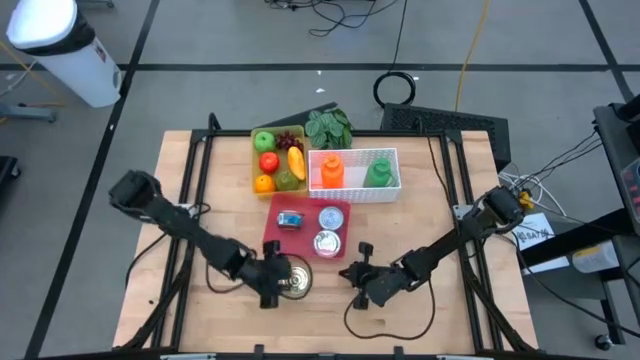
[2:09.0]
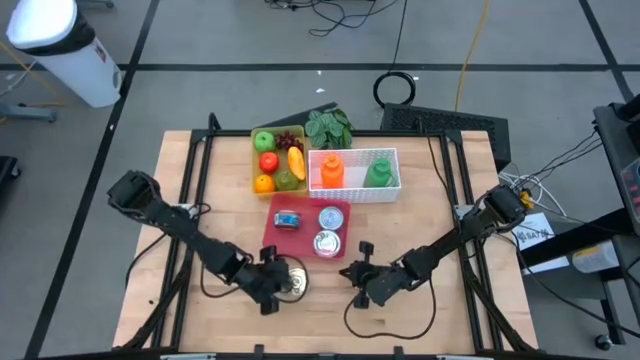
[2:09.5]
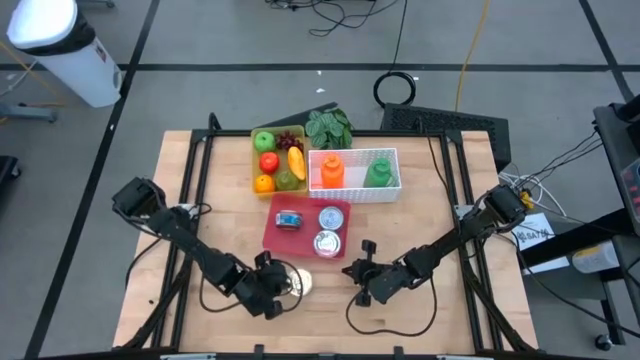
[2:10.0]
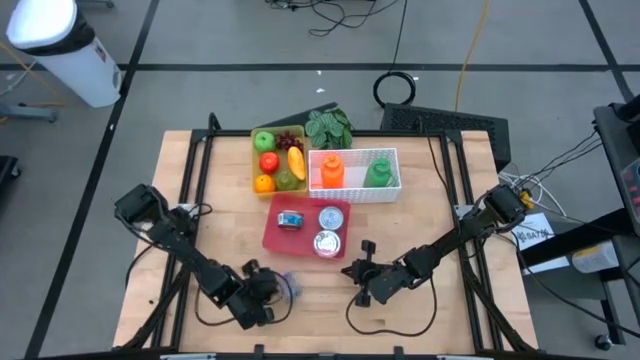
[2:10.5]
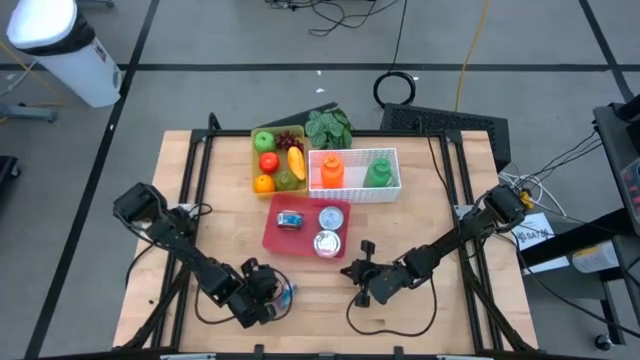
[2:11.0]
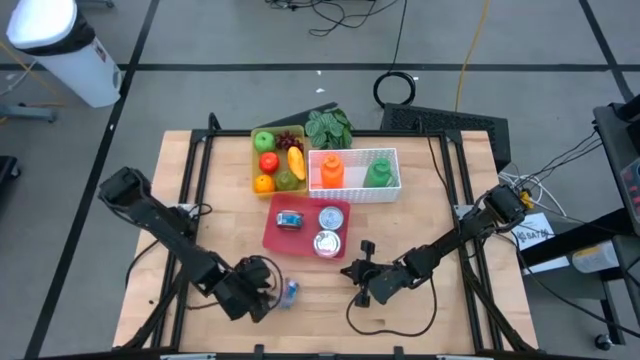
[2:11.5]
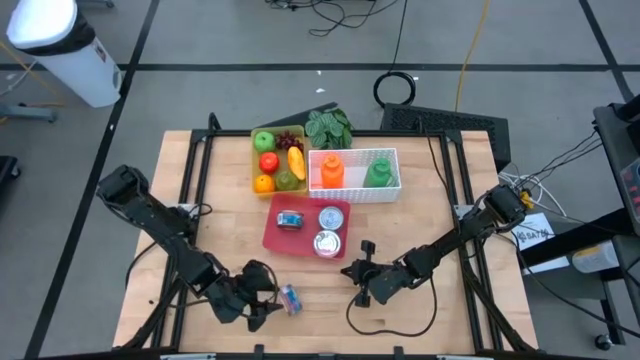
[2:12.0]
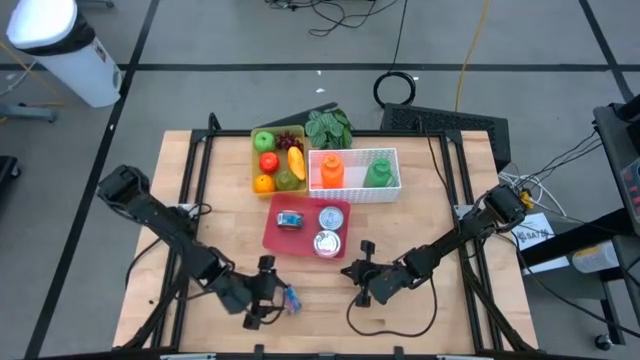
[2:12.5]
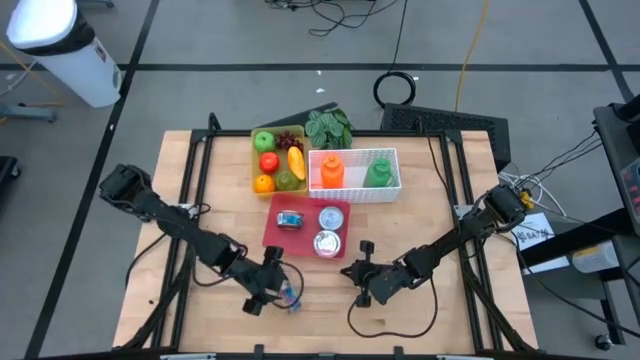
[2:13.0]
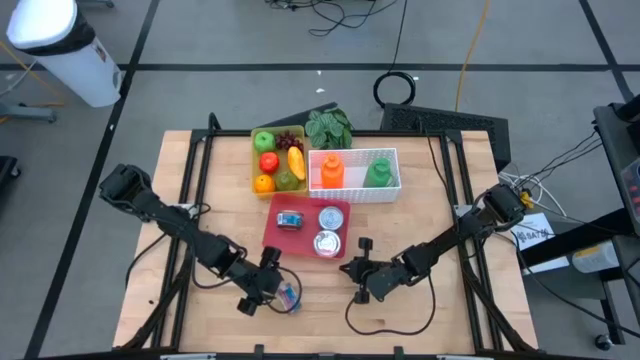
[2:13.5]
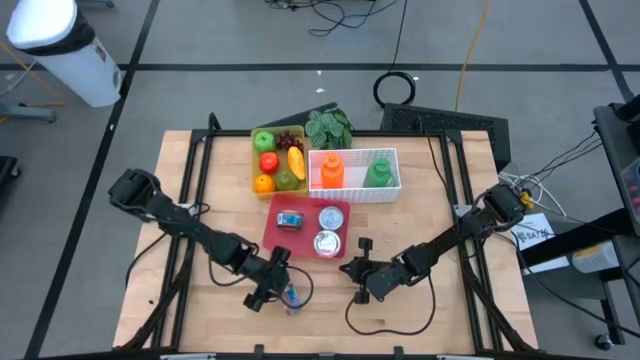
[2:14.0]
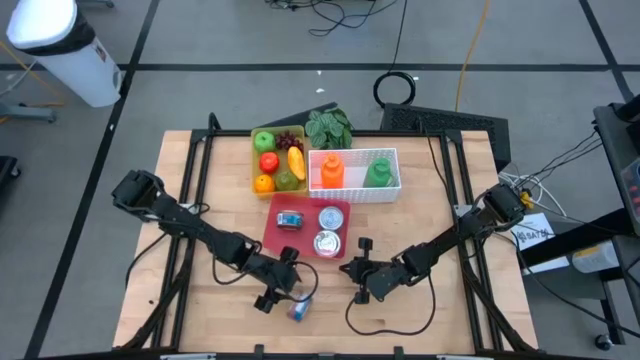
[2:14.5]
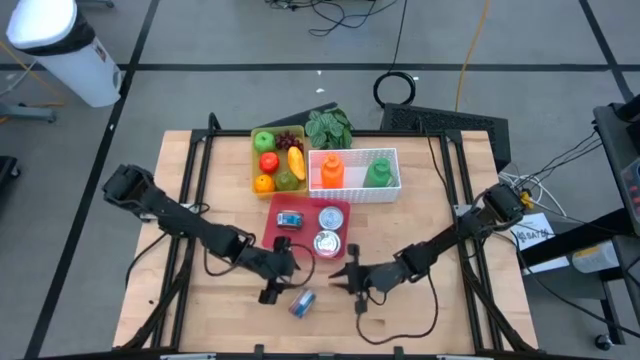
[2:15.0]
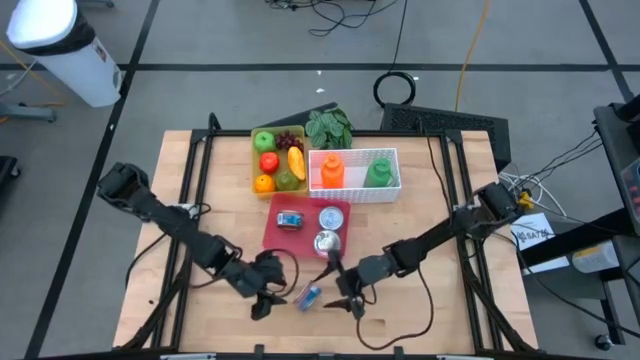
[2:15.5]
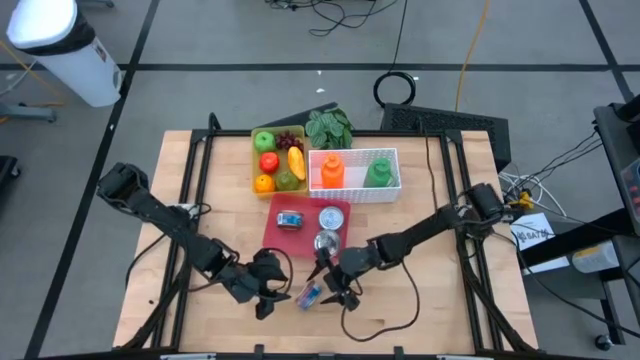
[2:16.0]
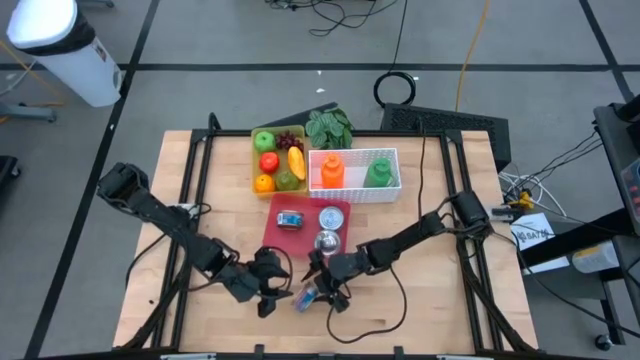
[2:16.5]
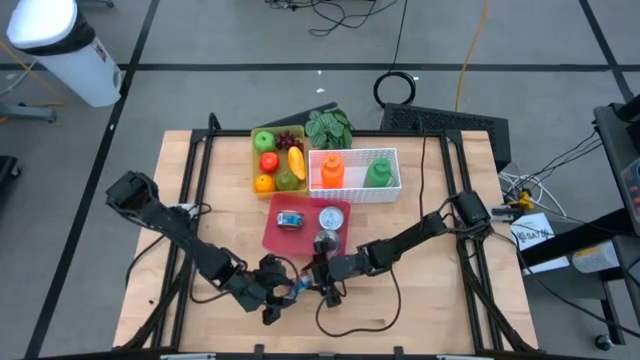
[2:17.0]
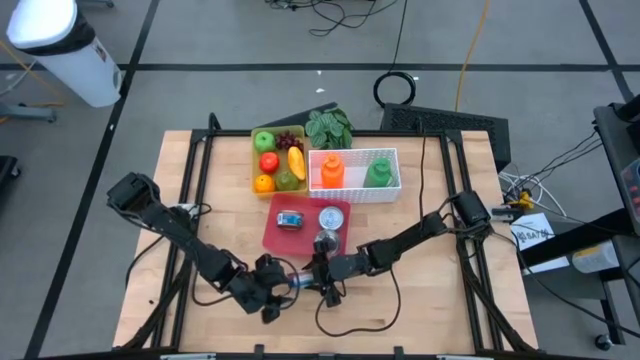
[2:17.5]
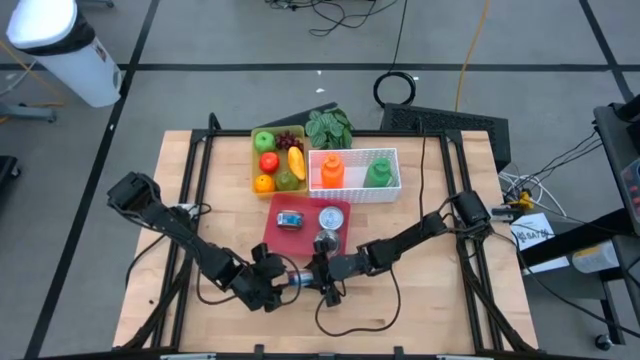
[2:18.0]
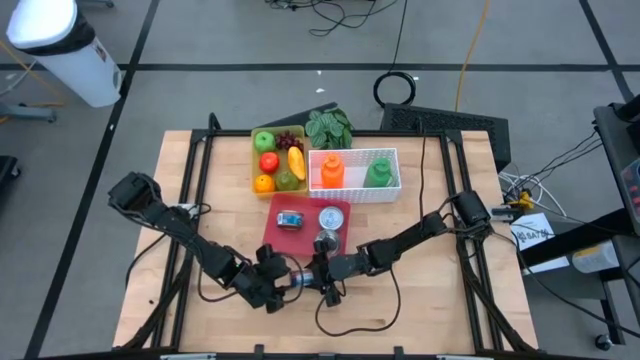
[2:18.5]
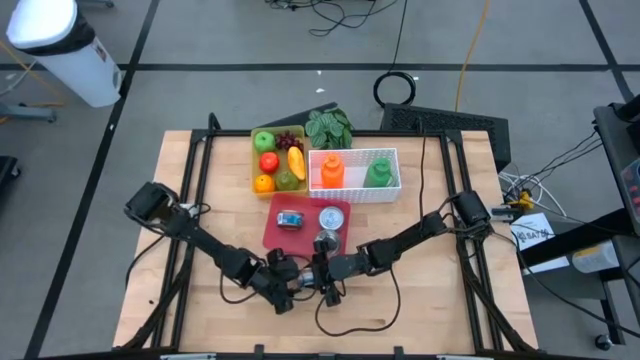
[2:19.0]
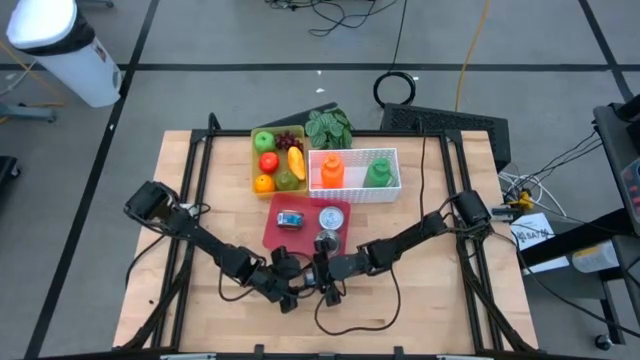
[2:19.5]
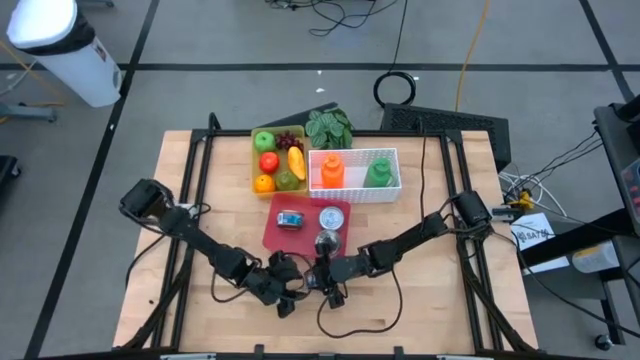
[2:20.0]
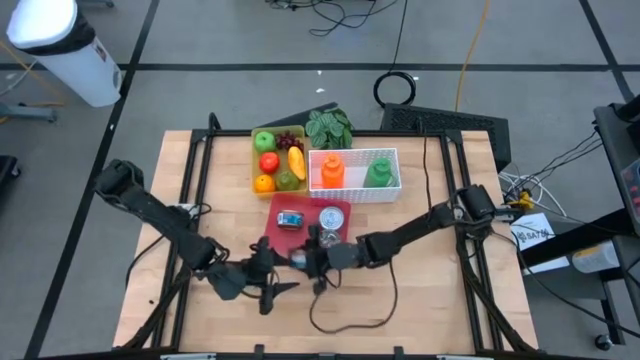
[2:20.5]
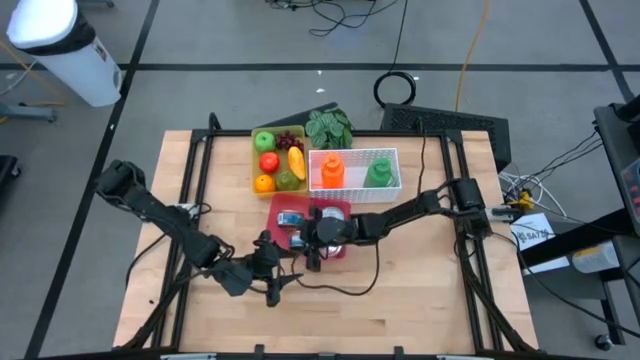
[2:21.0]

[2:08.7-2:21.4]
Task: Pick & Place Food Item
Put the blue pink tuna can in the pink bin

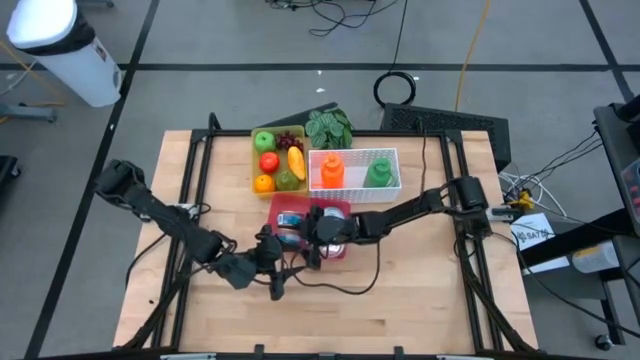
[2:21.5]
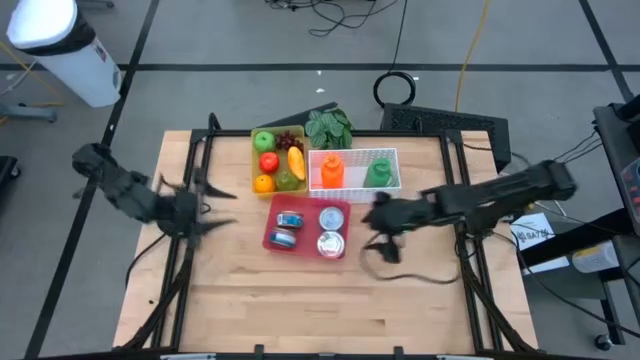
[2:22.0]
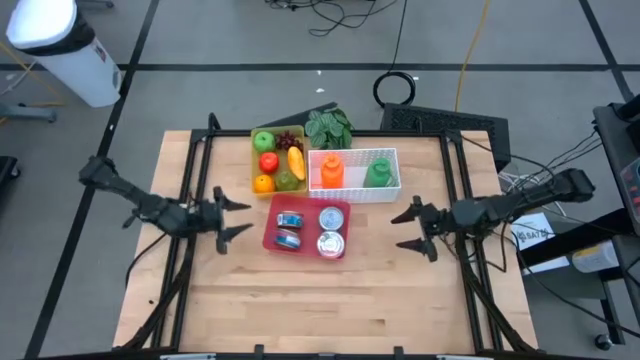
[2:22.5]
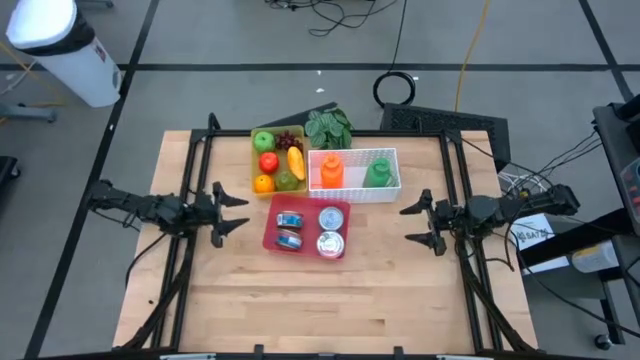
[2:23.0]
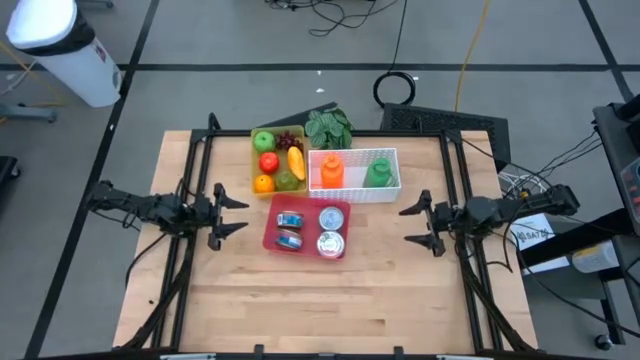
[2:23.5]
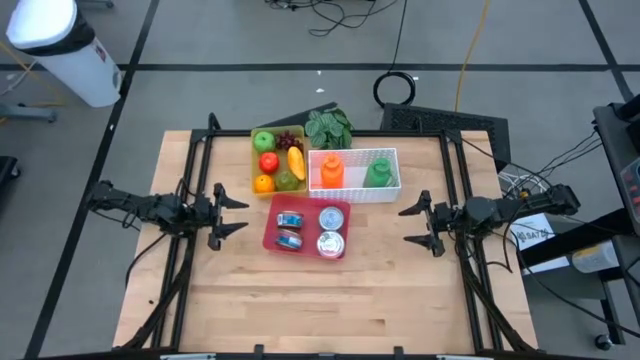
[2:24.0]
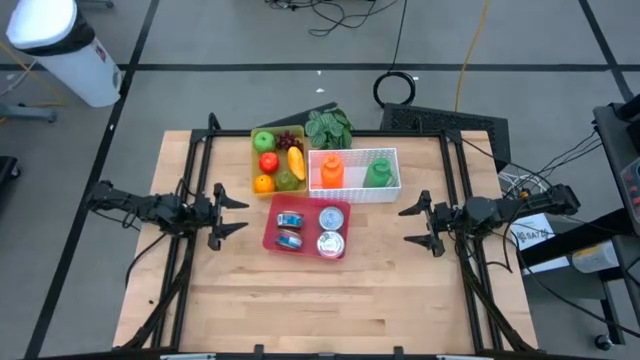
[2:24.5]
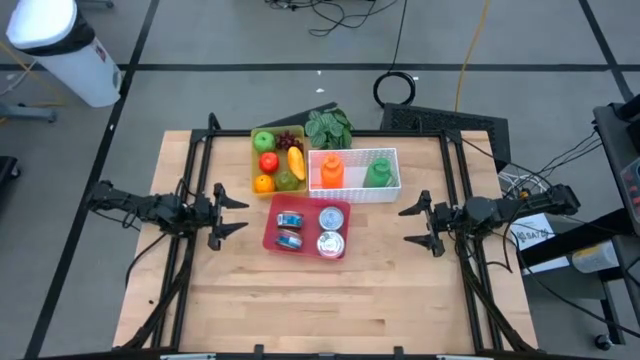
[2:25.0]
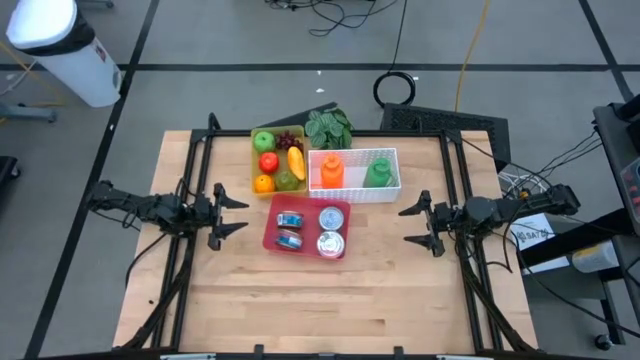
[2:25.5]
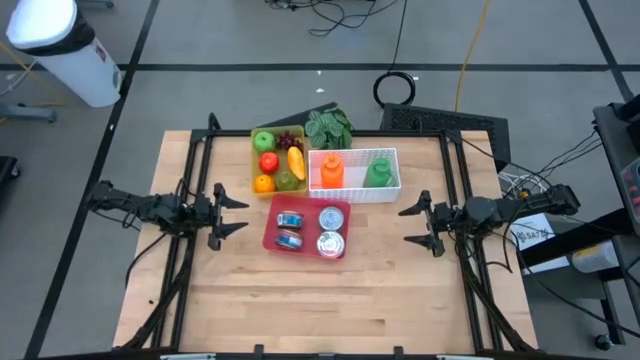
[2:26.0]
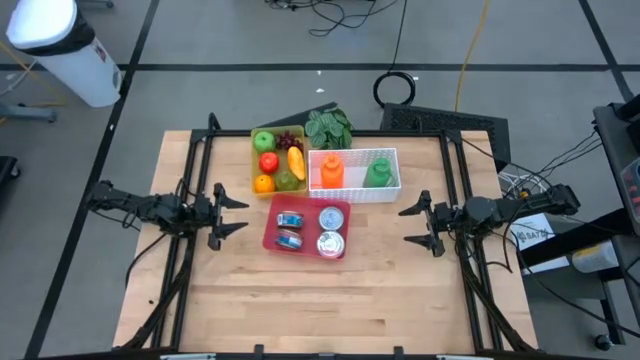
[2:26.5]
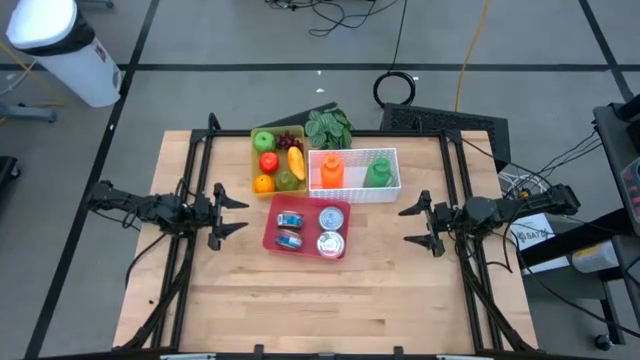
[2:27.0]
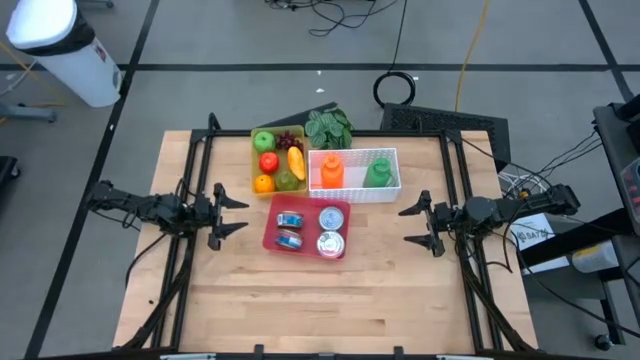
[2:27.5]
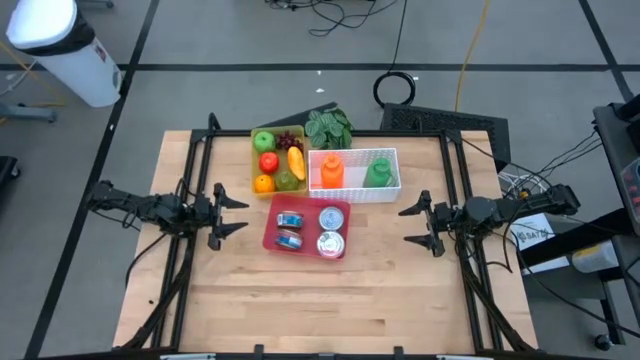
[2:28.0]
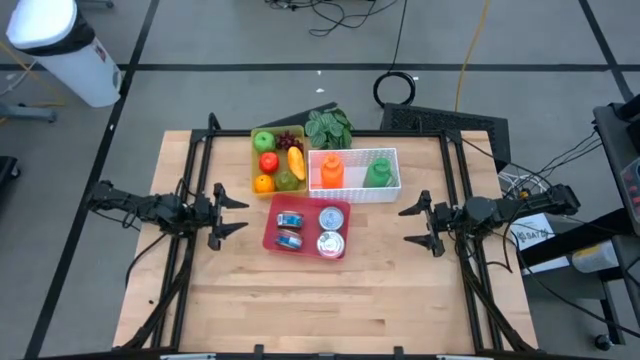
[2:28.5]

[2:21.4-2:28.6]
Return to Home Position

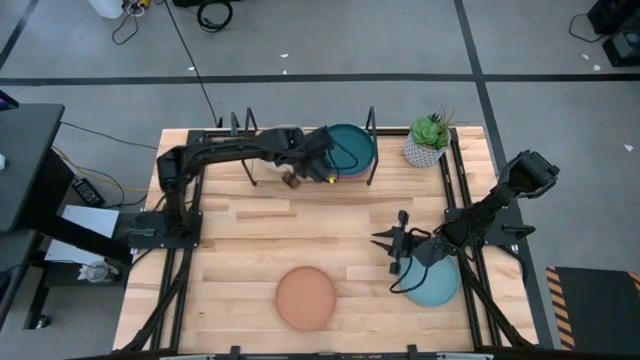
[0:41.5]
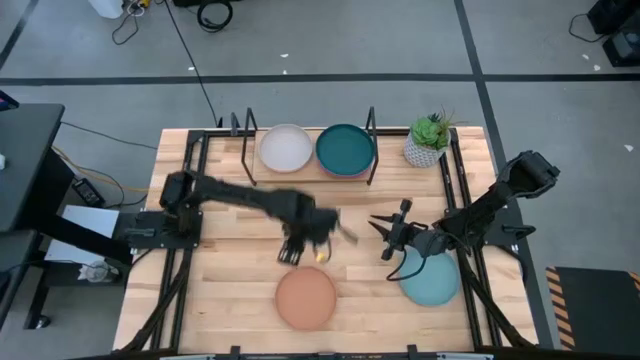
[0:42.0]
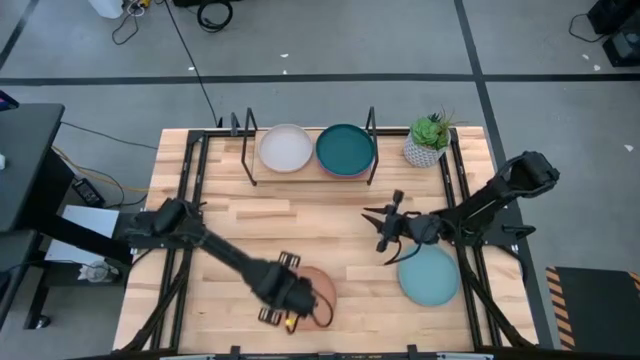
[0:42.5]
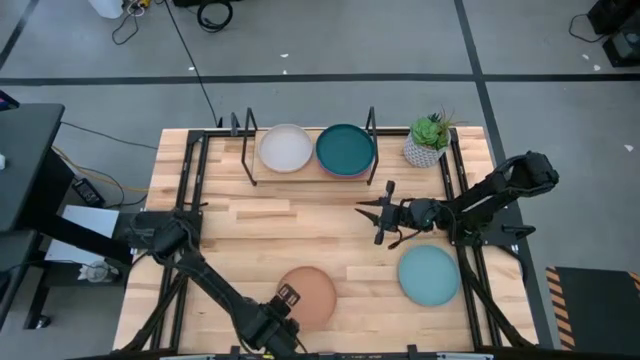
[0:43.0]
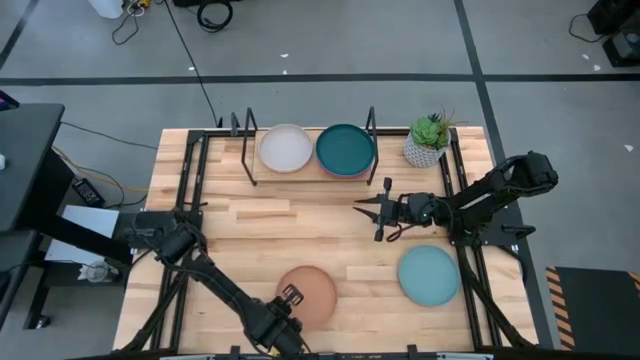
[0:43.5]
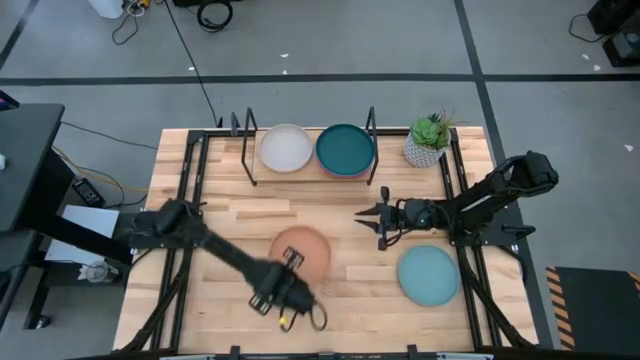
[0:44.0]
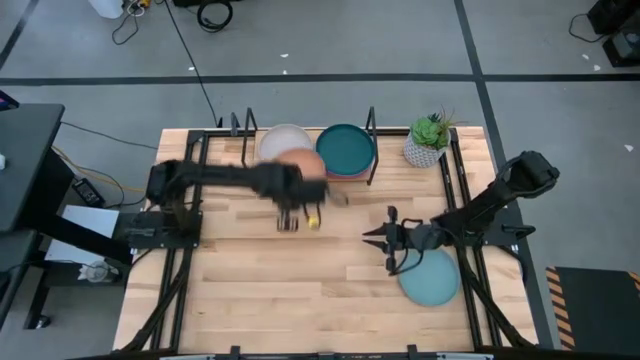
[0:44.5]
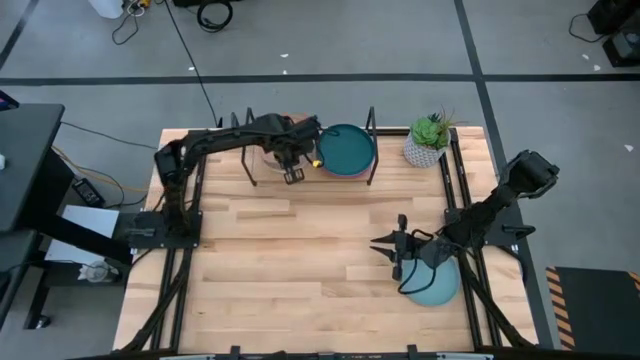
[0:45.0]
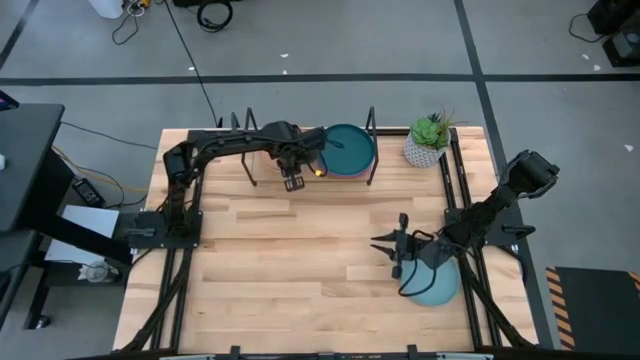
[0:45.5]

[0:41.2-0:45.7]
Task: Place and stack plates onto a shelf
Stack the brown plate on top of the gray plate on the shelf
